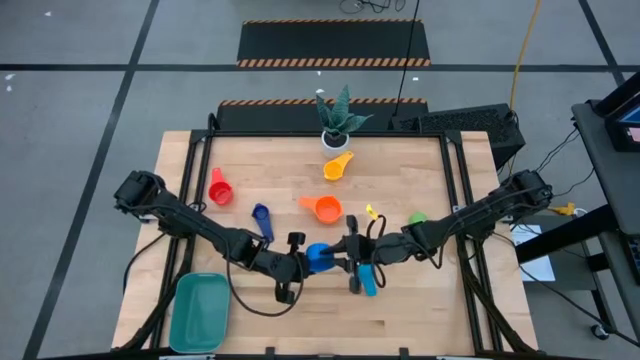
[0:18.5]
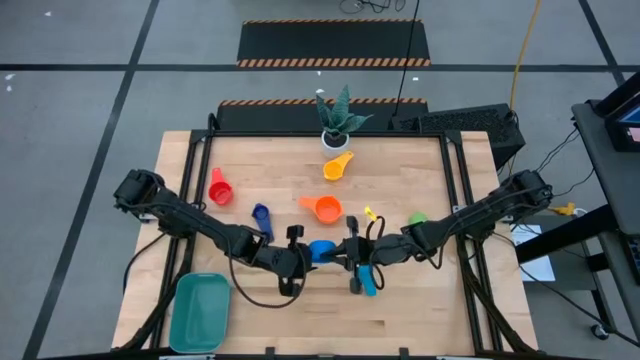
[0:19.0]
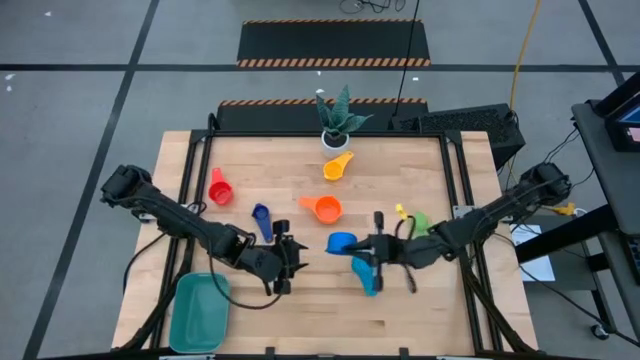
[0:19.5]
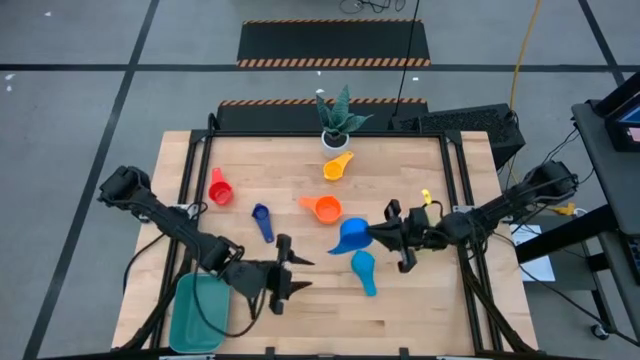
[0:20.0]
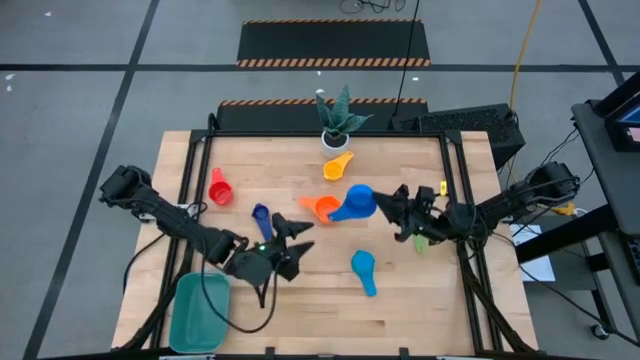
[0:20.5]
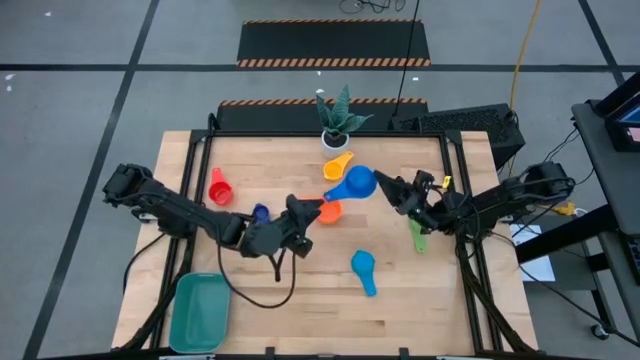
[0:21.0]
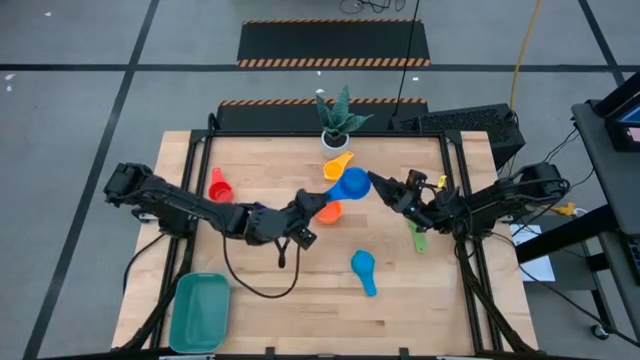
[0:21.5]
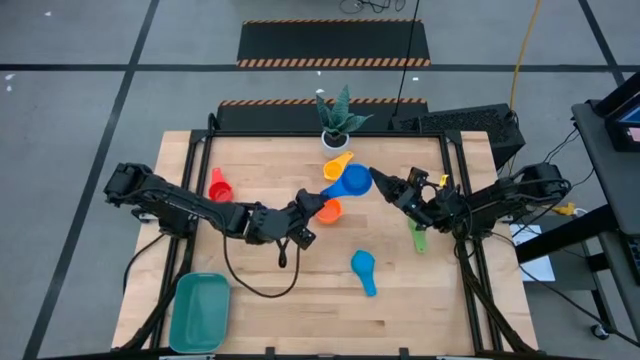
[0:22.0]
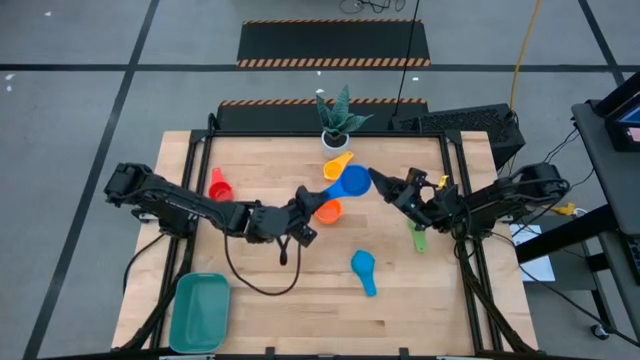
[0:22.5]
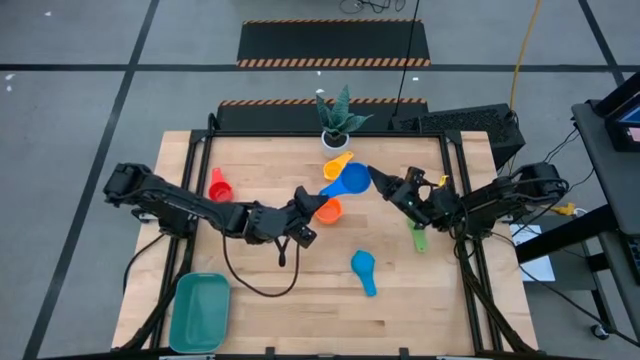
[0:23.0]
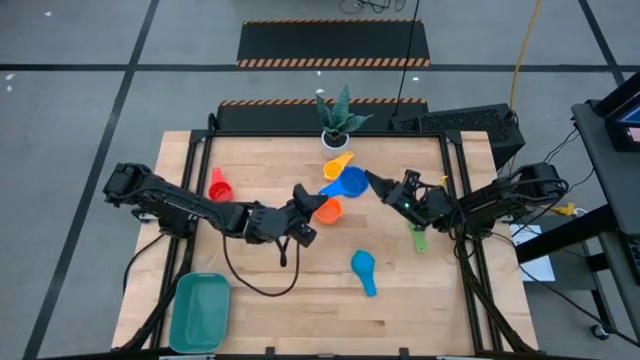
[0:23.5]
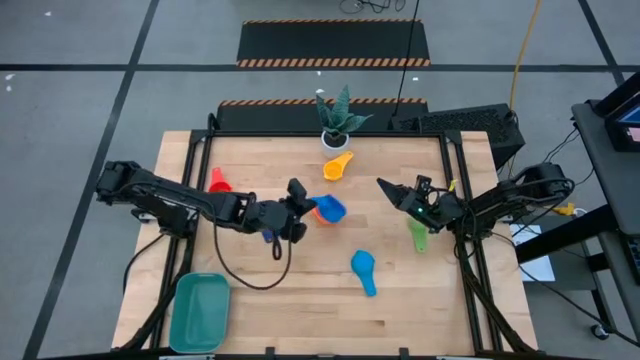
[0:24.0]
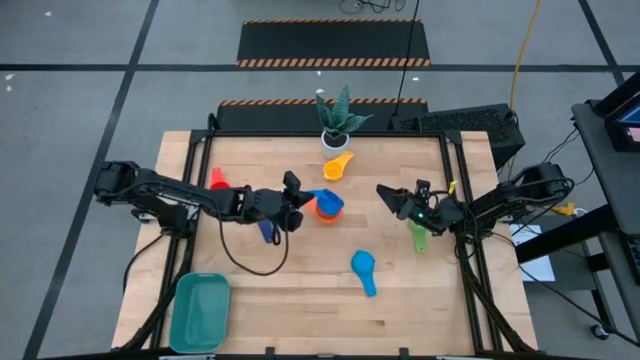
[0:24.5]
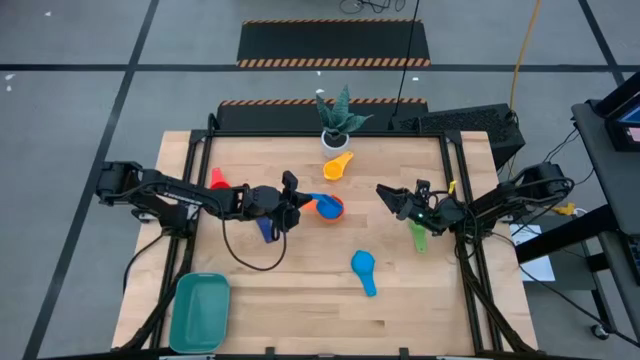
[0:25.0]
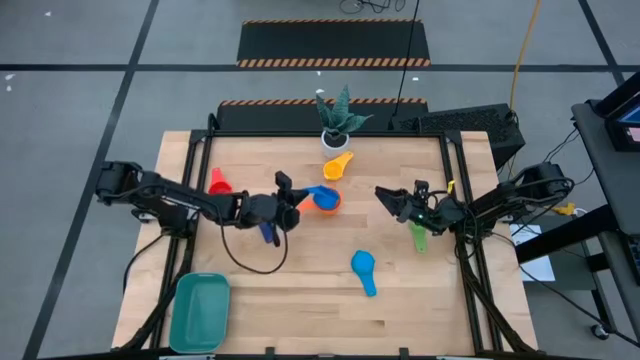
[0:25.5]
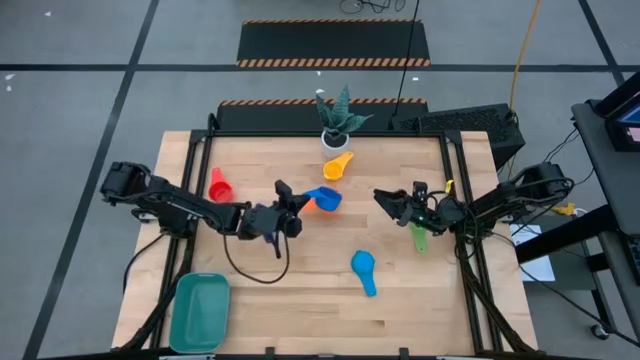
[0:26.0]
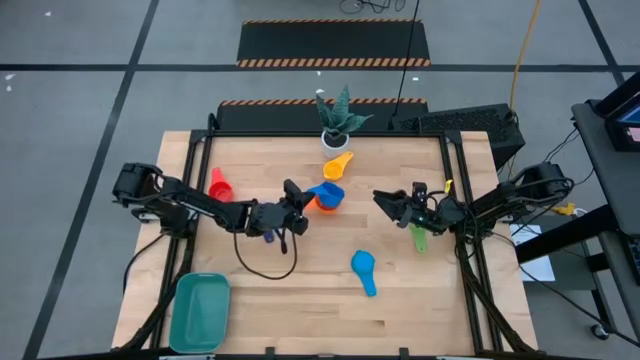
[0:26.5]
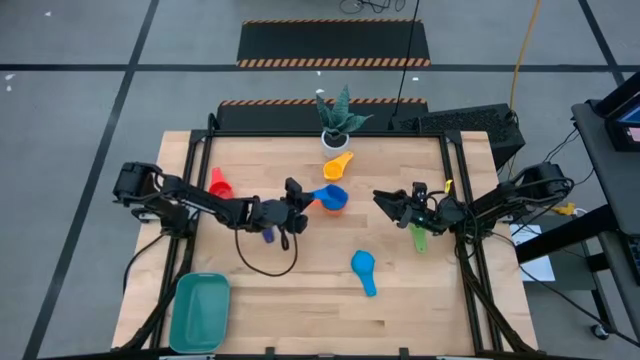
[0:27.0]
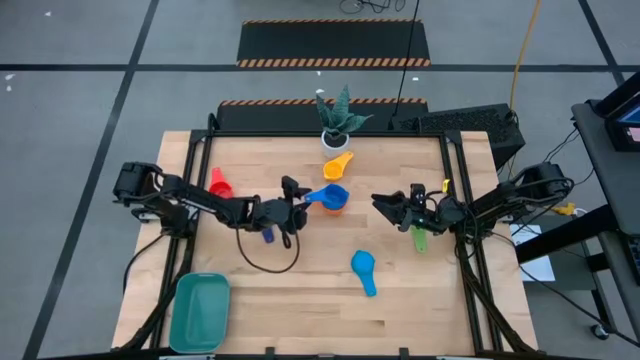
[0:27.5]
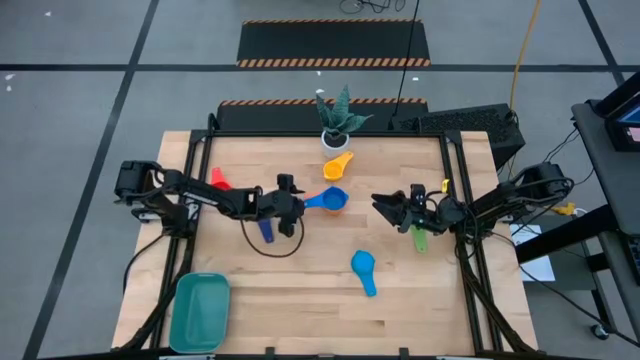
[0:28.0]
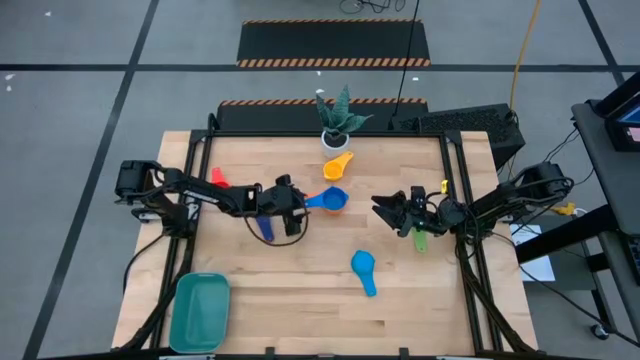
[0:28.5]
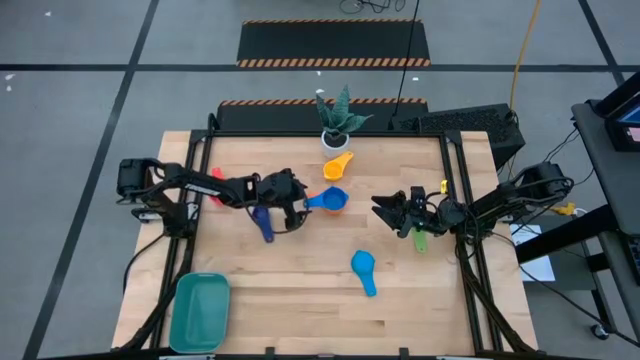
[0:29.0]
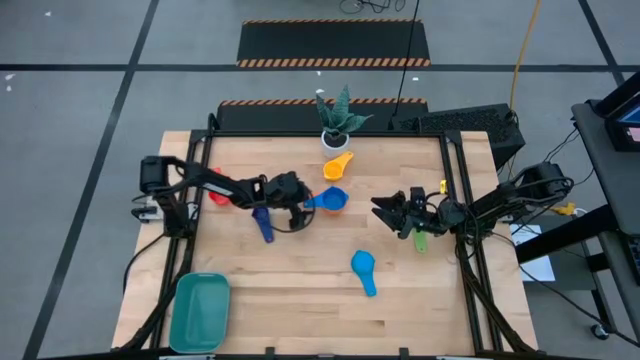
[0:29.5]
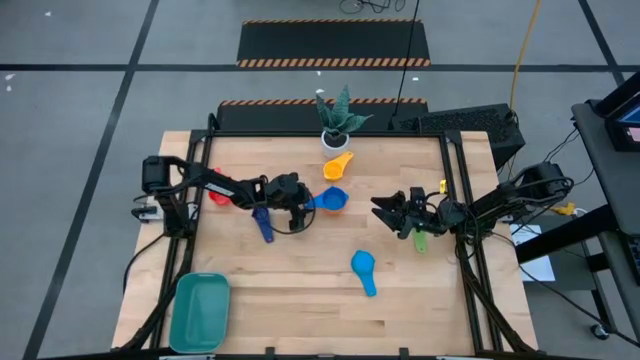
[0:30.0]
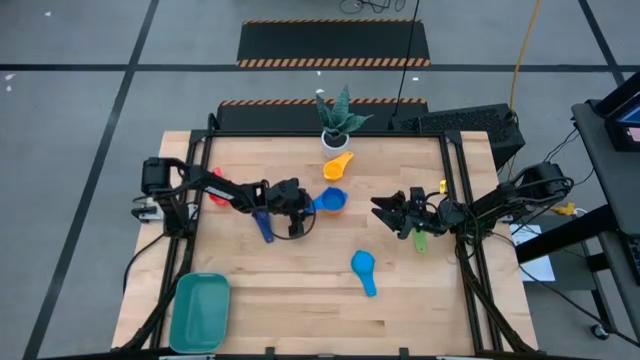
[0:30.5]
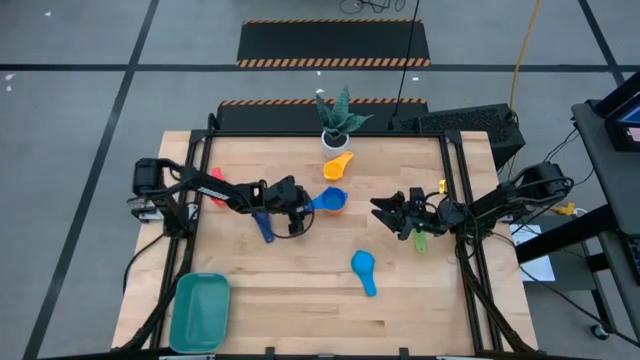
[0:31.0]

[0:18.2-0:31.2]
Task: Nest measuring cups in basket
Stack the blue measuring cup on the orange measuring cup

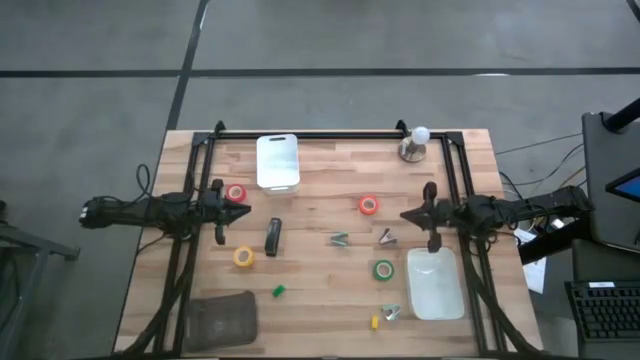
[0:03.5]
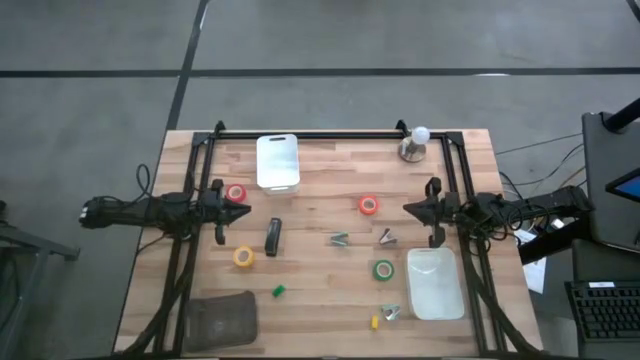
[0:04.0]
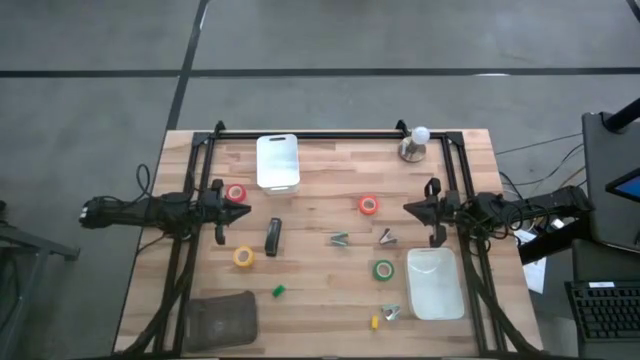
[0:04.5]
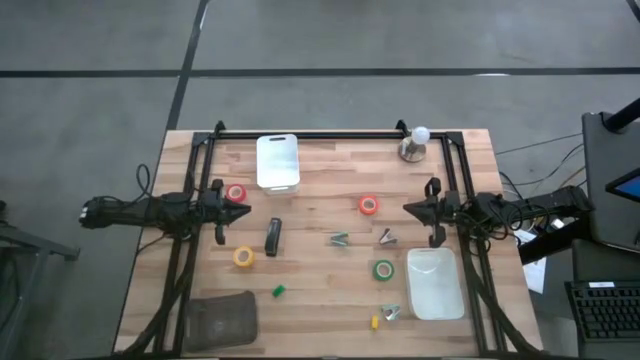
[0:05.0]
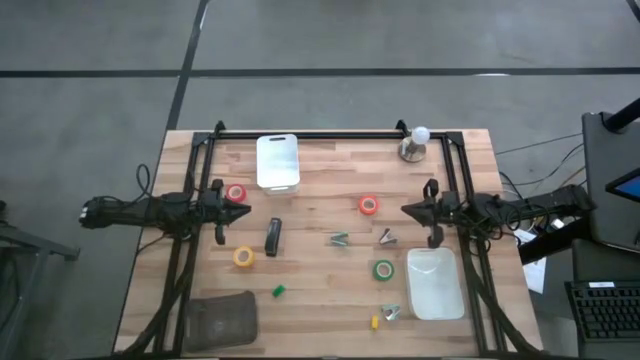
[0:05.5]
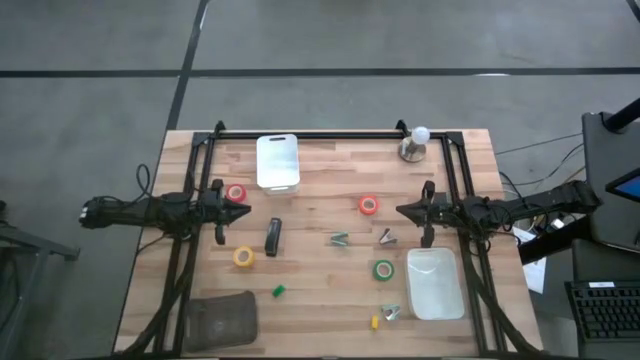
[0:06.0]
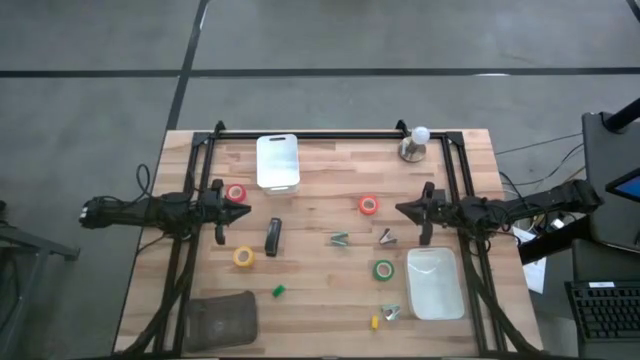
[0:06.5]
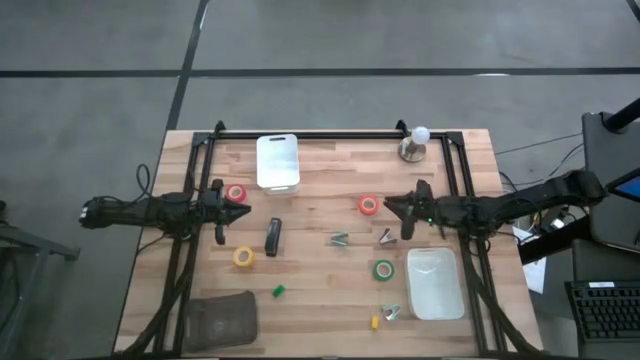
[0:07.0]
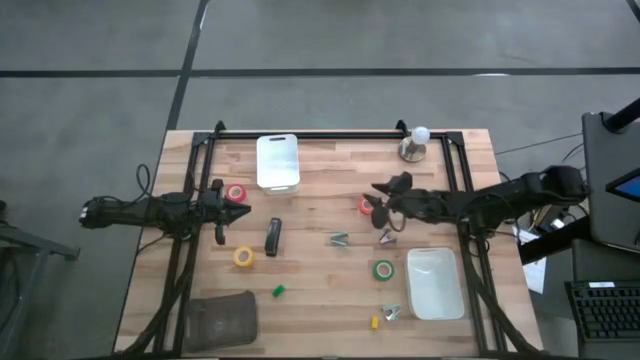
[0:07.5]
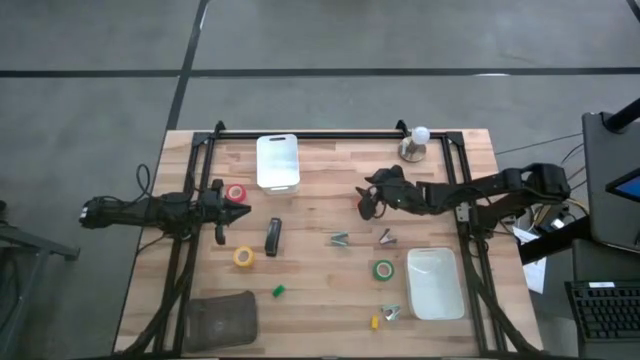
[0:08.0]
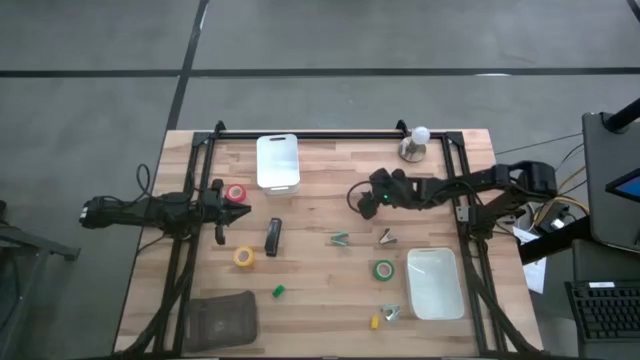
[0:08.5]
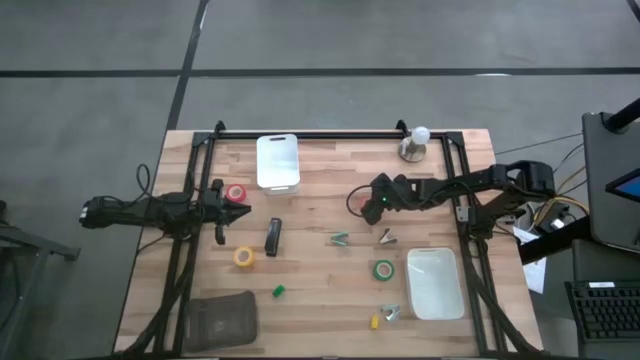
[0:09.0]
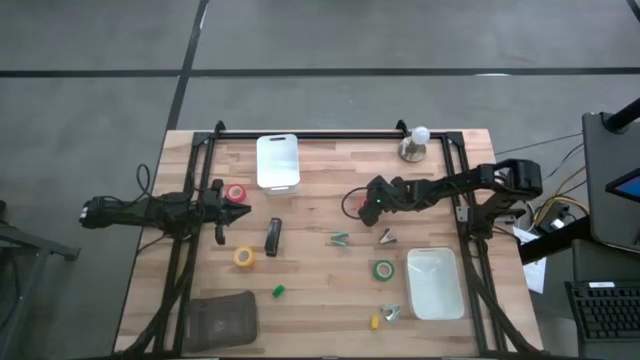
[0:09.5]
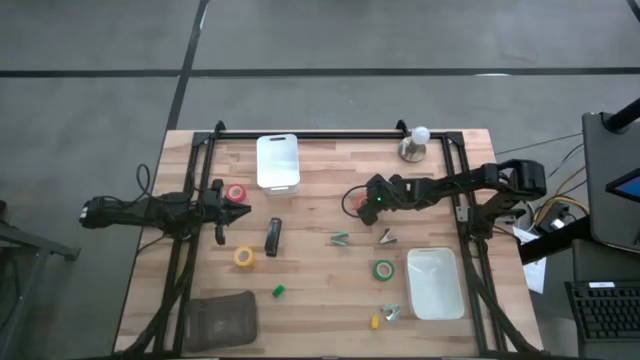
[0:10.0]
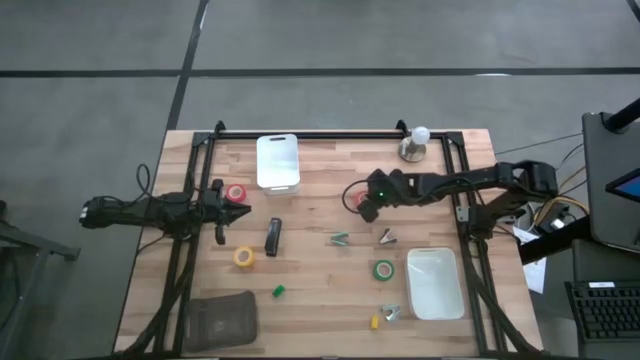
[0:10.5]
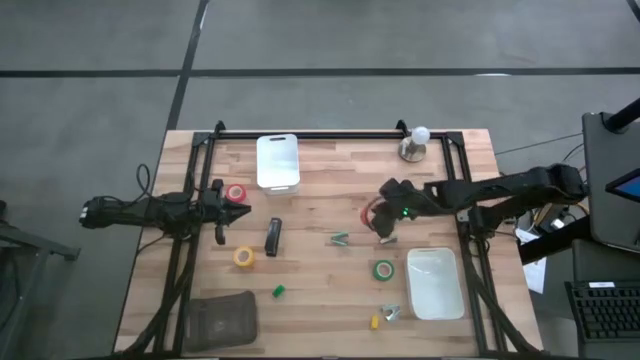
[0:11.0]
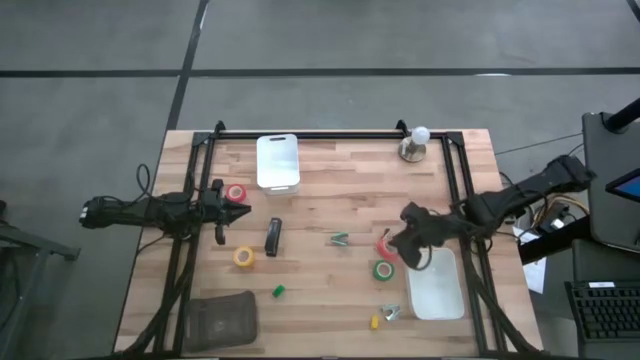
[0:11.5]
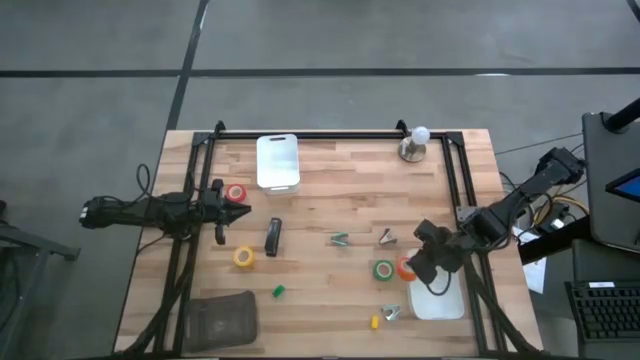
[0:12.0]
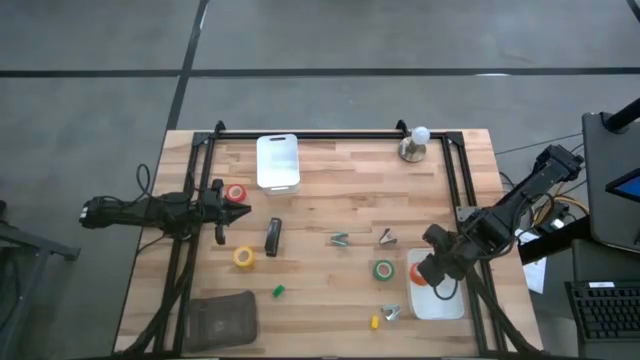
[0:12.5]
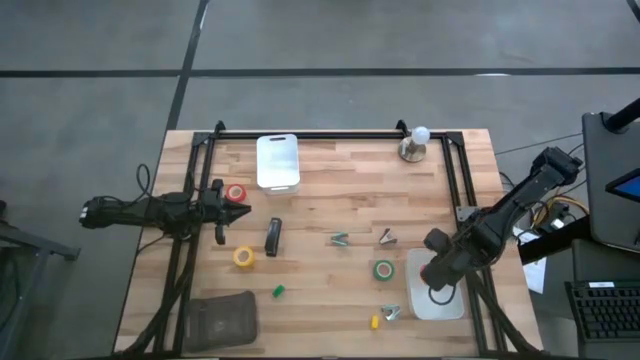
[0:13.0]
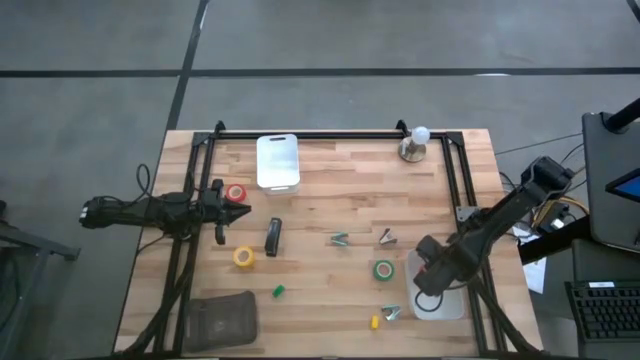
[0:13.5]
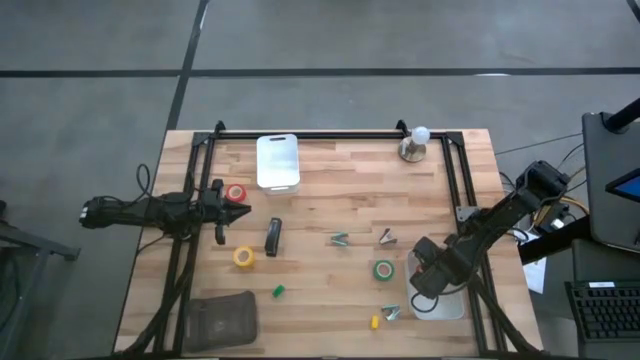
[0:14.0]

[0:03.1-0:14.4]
Task: Pick and place Stapler, Stapler remover, tape
Put the orange tape into the bottom white bin
